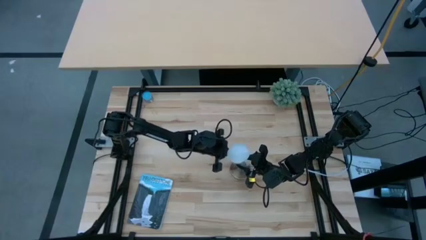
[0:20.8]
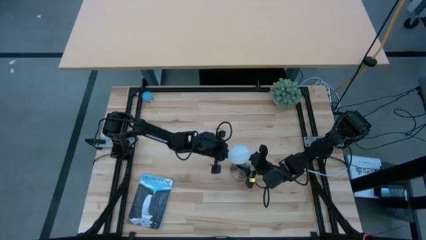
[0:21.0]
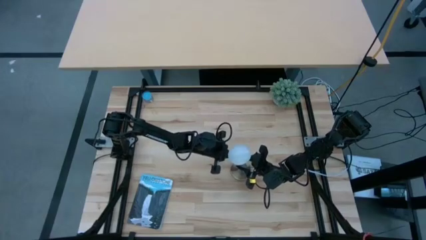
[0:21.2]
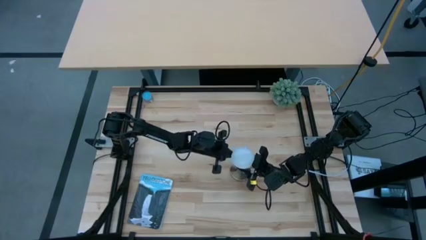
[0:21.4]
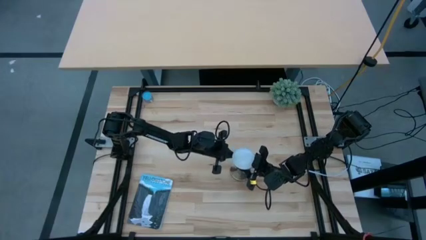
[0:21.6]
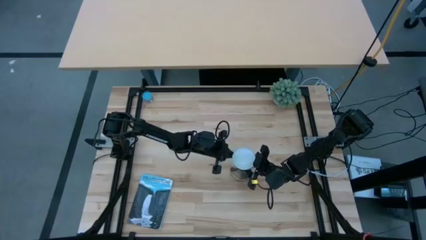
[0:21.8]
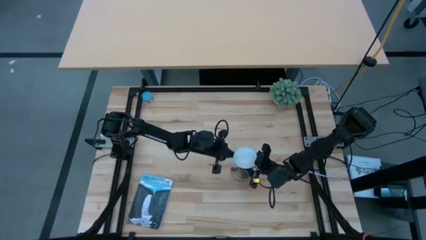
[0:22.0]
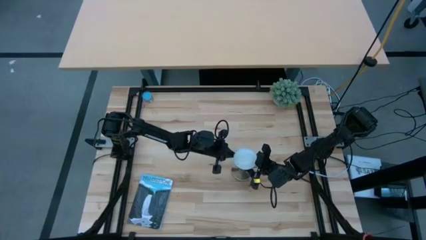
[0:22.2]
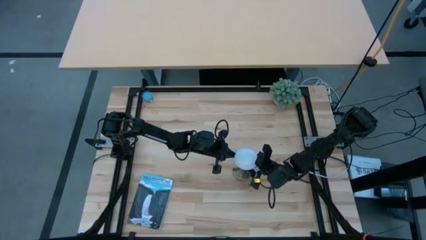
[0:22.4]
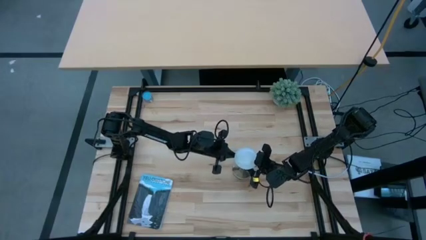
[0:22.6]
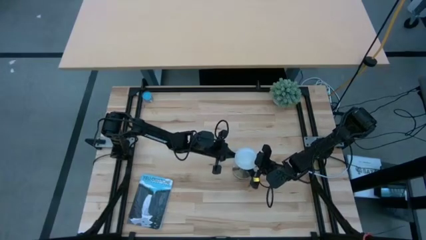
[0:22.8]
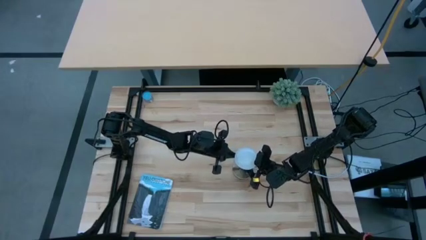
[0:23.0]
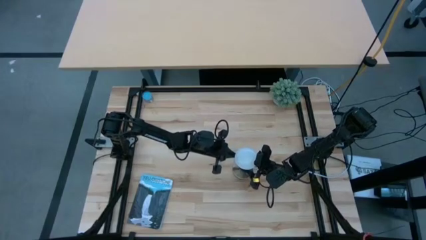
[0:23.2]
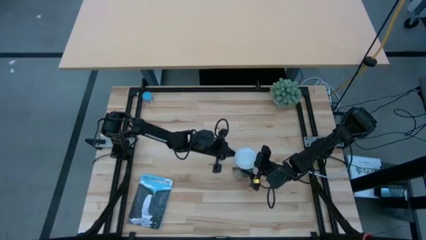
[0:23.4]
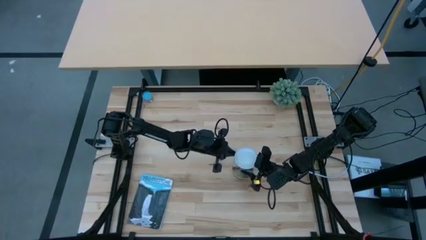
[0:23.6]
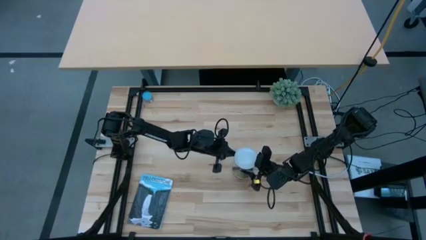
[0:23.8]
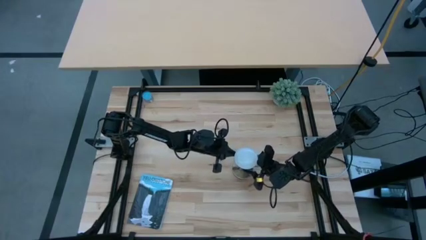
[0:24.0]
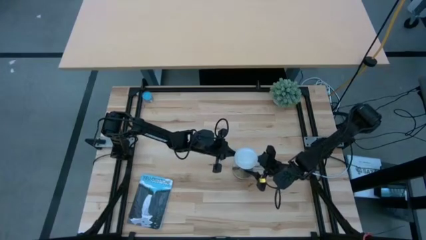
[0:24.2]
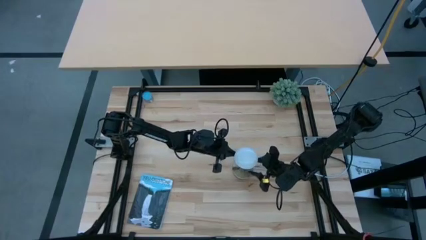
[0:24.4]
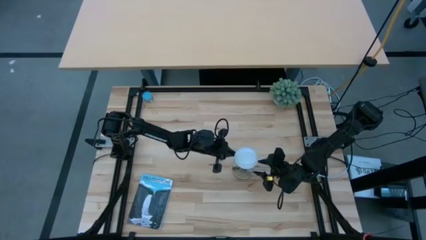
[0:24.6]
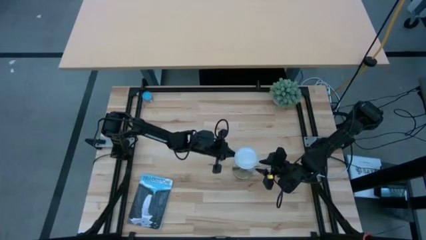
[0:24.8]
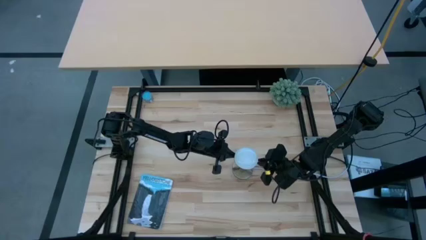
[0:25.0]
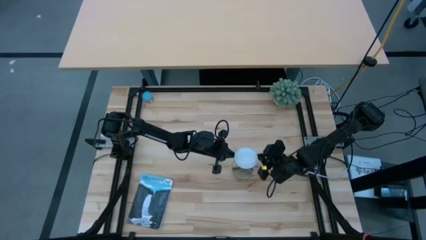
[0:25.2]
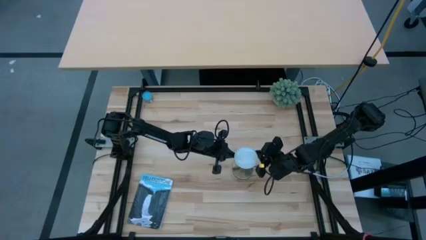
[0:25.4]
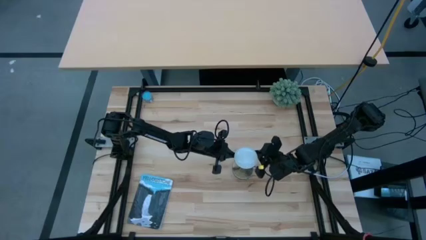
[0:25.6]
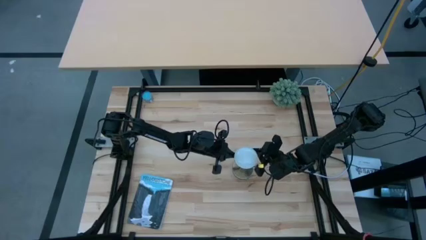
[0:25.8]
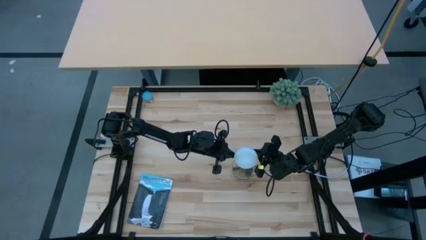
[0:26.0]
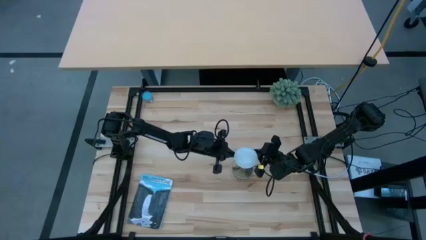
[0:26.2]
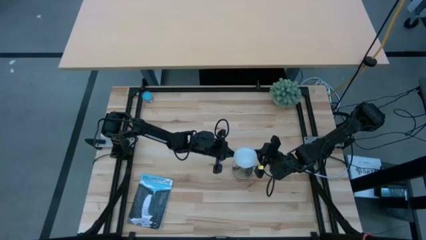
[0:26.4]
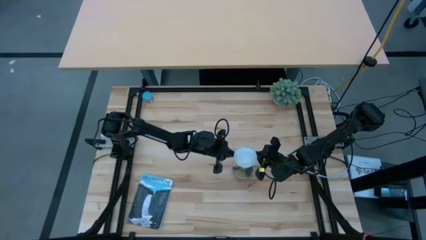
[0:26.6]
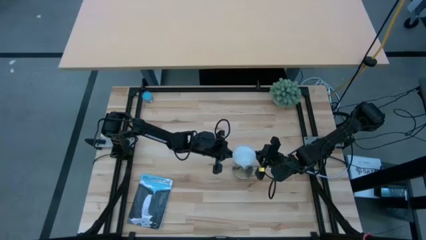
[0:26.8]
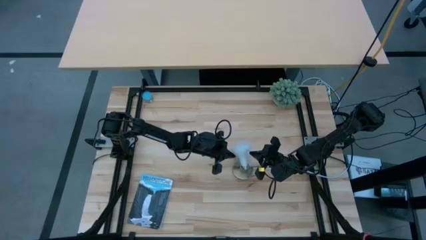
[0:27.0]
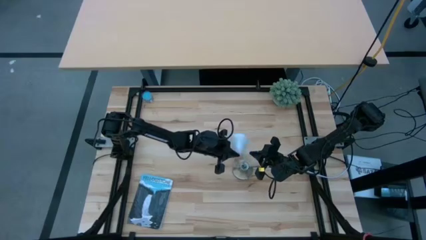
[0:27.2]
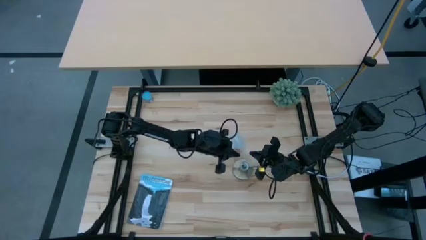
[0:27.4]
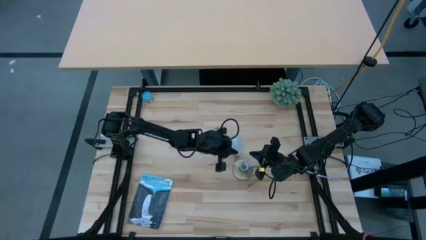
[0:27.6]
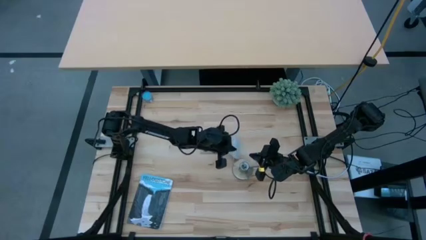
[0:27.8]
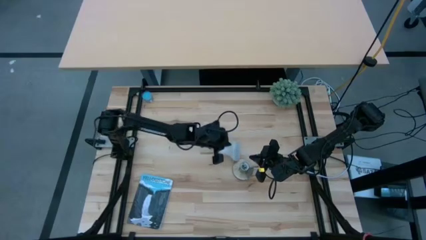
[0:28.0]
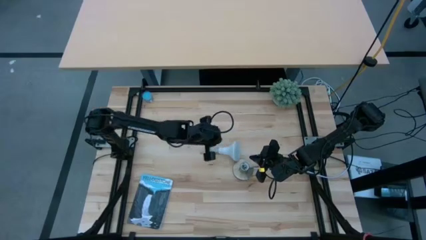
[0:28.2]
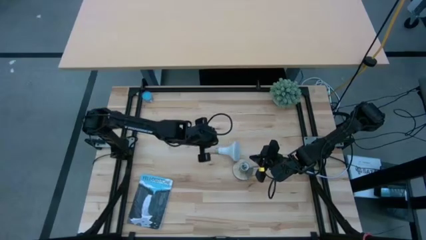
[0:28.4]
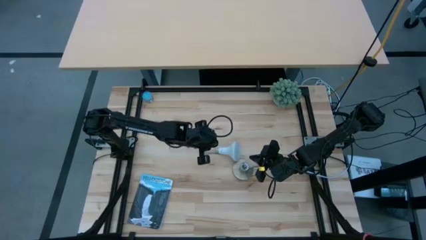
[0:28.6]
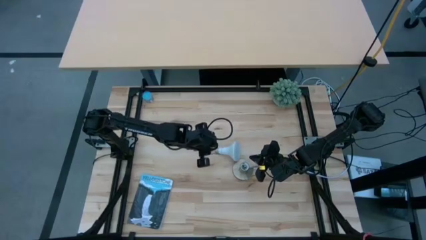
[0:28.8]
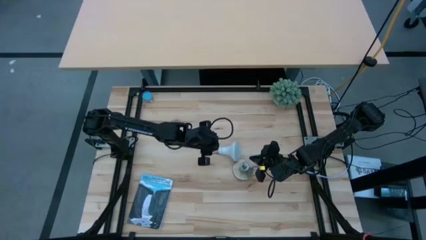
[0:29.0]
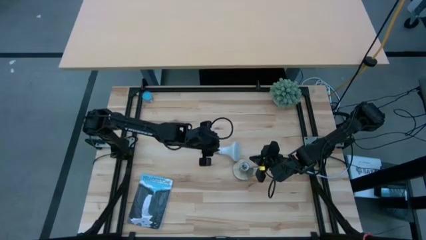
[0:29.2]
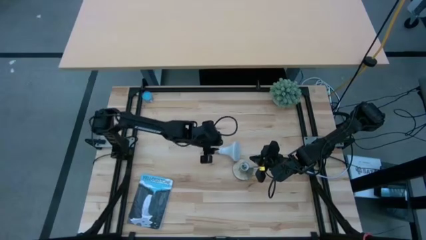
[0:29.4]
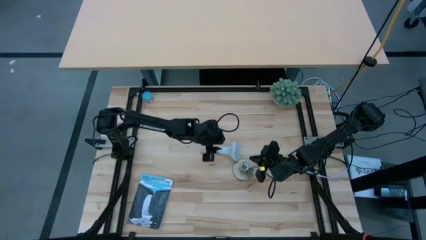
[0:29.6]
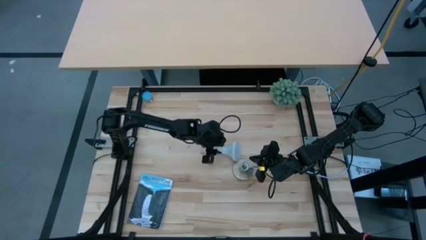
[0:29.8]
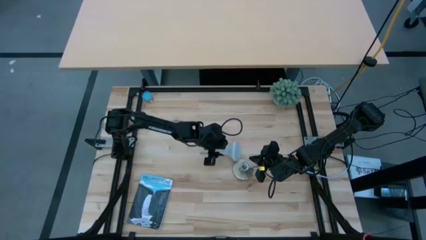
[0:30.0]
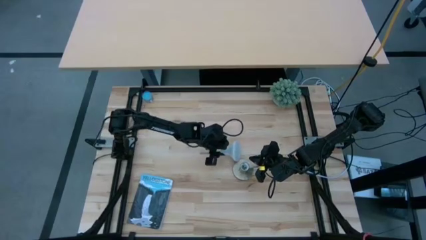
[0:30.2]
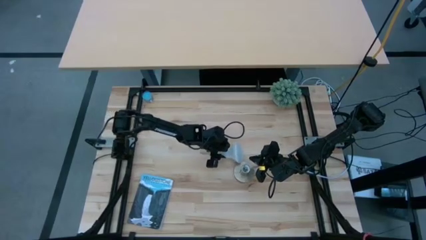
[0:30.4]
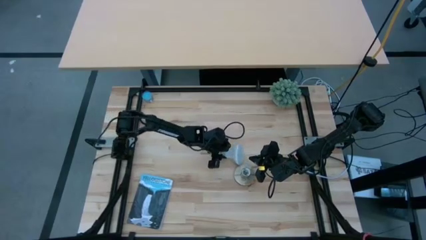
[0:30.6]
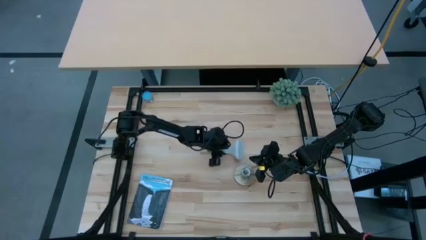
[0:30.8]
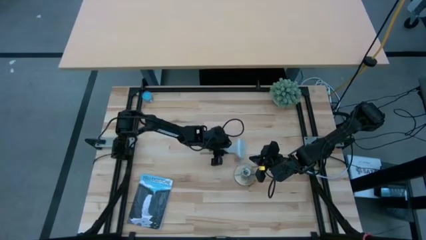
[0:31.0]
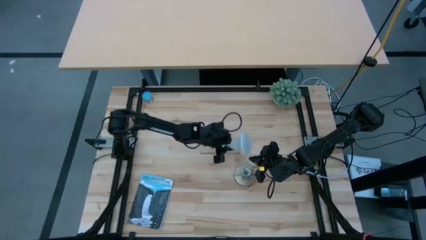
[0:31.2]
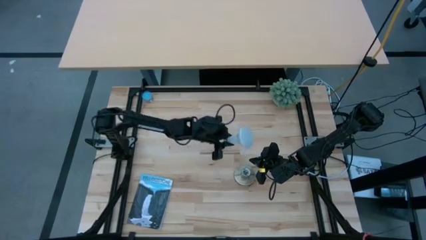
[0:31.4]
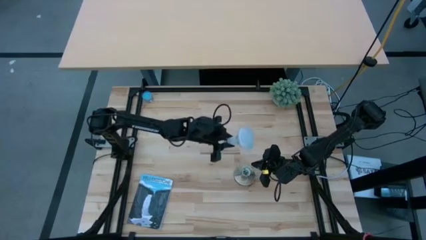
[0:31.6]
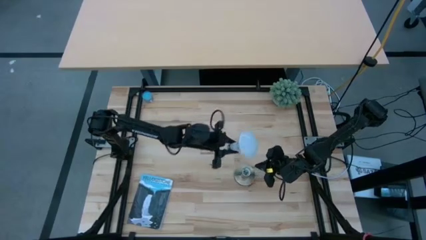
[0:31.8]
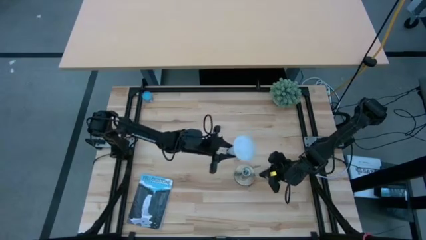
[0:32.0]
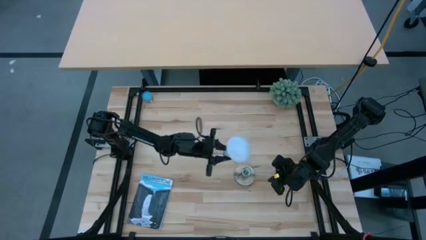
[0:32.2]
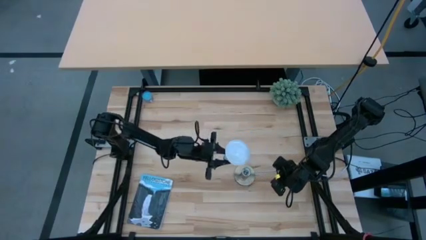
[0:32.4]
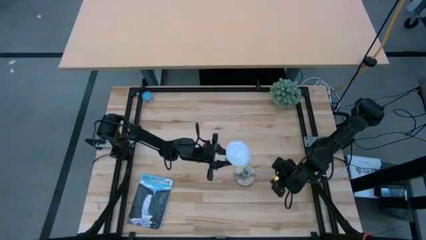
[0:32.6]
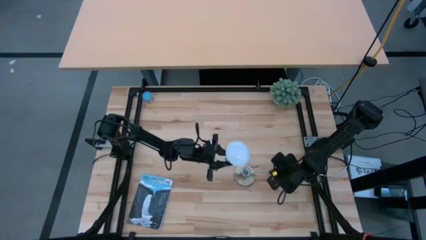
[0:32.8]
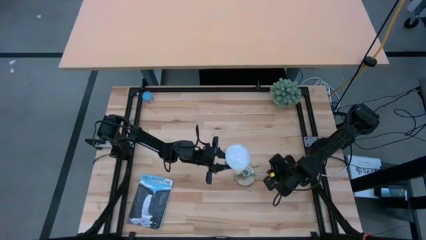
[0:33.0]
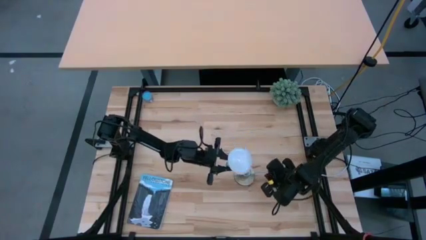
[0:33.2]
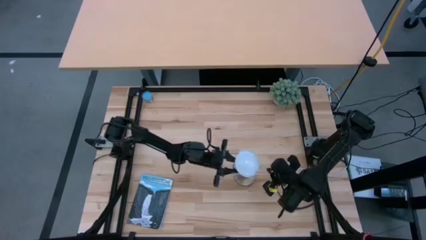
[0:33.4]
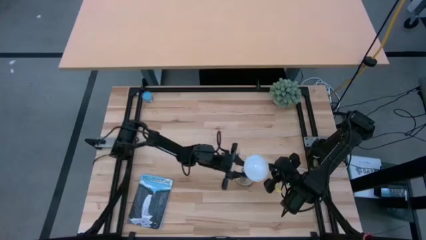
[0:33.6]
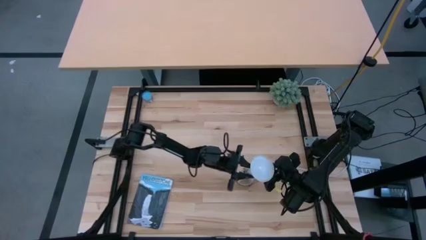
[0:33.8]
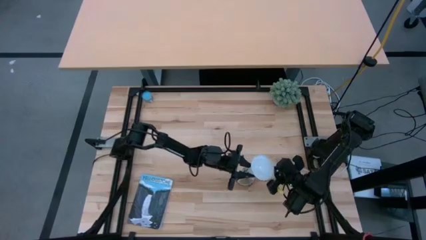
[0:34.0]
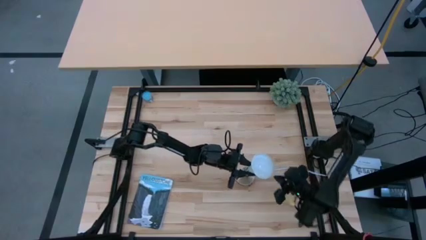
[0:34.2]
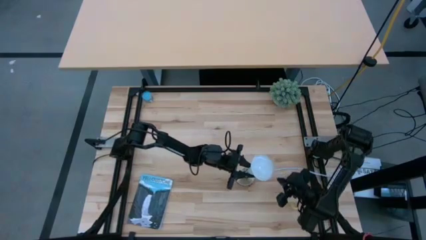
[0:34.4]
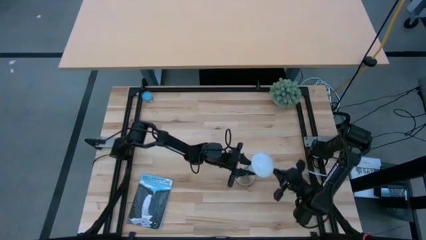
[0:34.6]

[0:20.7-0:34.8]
Task: Screw lightbulb
Insert the lightbulb into the bronze lamp socket

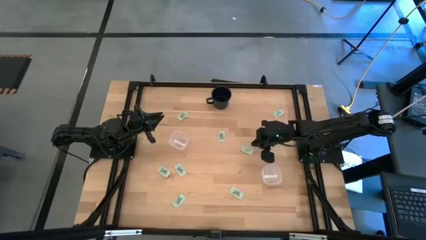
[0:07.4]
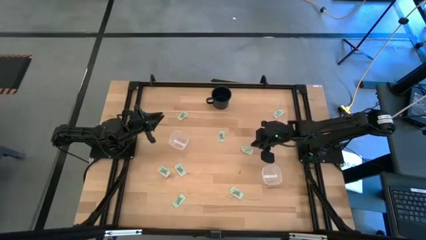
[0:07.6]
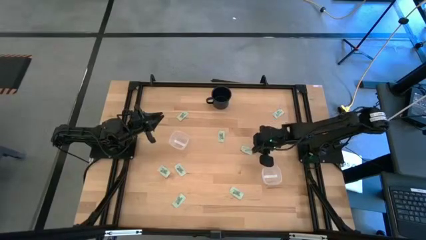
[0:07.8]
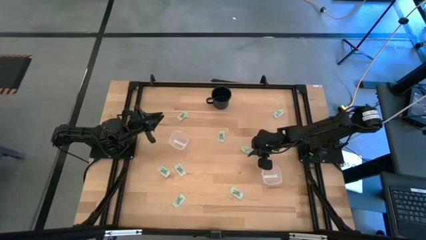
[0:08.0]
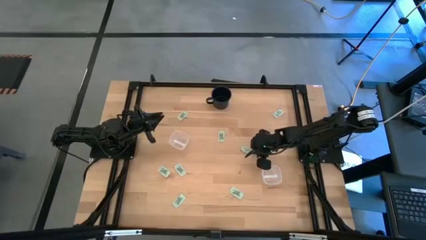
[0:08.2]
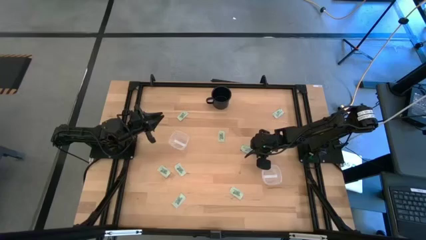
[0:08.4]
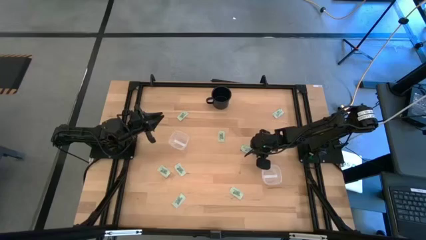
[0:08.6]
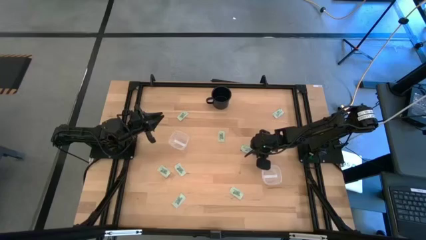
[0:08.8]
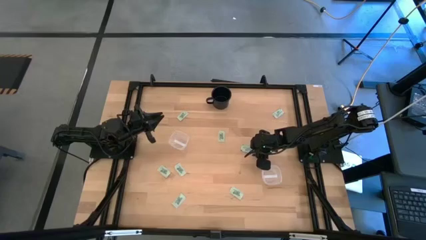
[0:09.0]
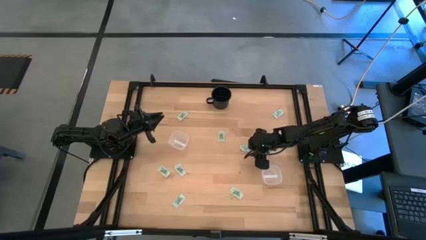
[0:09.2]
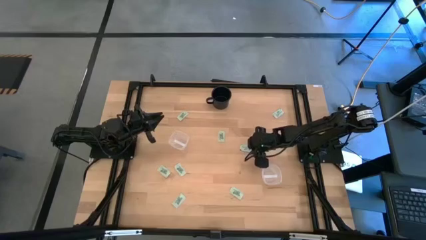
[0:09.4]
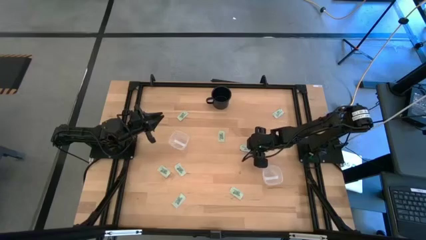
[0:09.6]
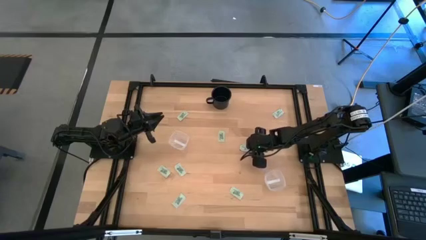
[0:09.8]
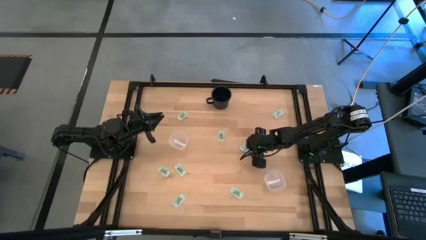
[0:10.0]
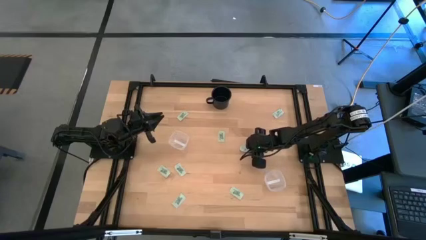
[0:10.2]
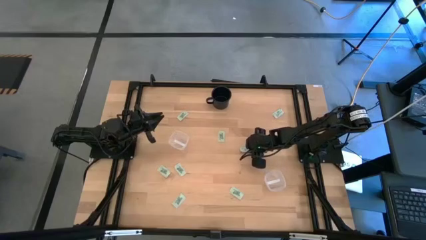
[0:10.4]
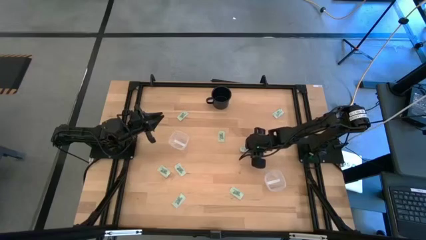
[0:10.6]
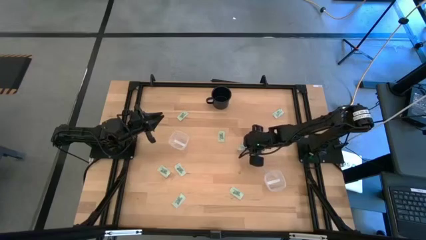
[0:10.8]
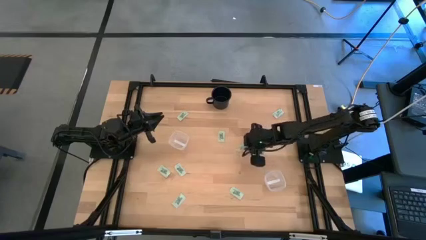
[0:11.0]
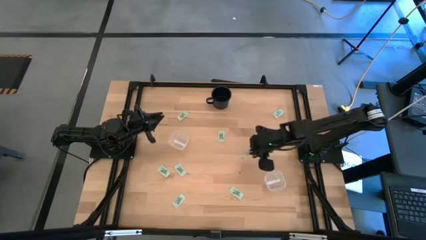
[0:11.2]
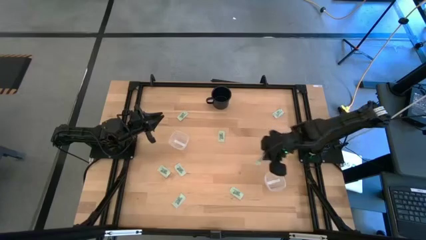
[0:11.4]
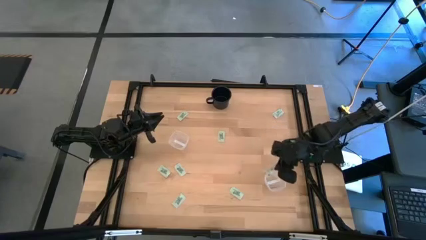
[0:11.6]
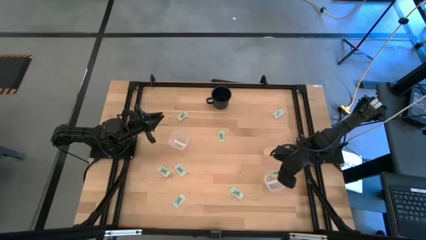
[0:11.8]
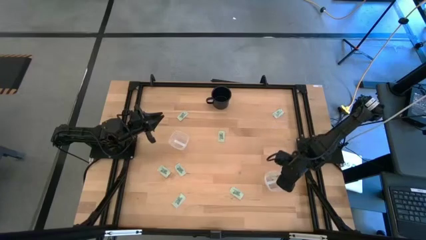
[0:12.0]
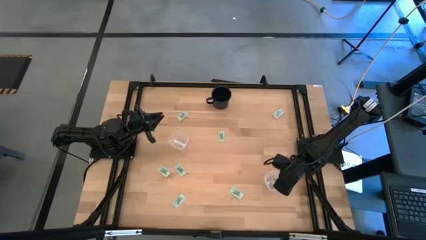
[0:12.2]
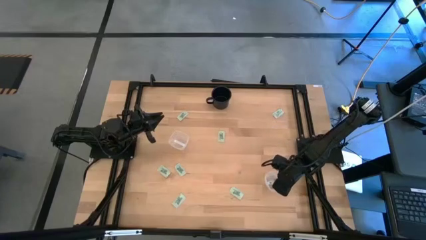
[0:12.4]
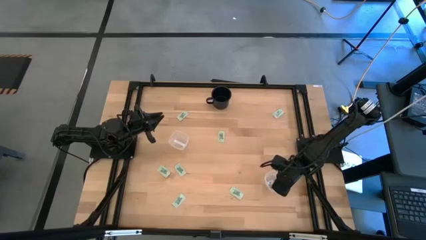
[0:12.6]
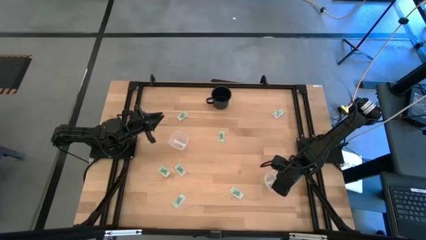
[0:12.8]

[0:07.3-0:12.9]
Task: Pick and place items into bin
Put the white stevia packet into the bottom transparent bin
